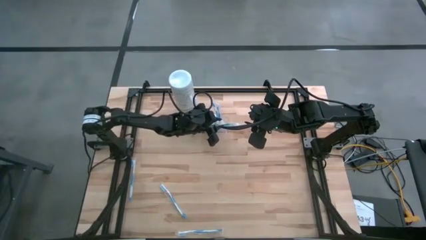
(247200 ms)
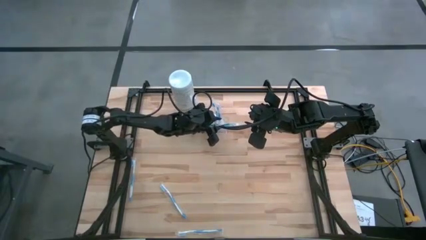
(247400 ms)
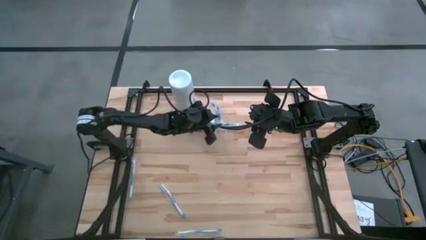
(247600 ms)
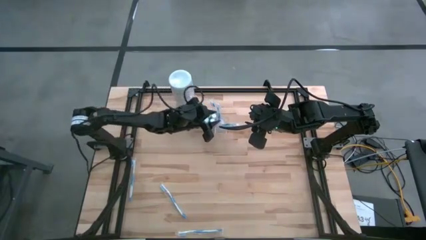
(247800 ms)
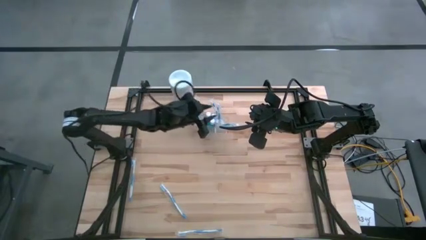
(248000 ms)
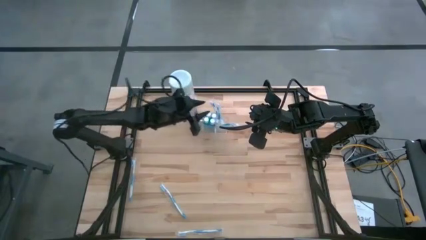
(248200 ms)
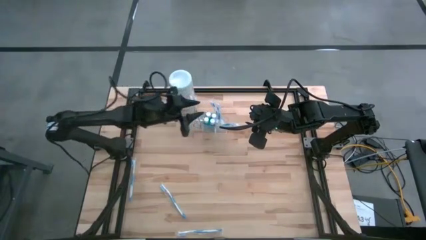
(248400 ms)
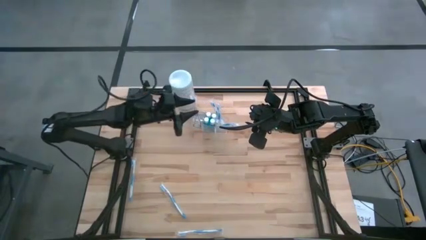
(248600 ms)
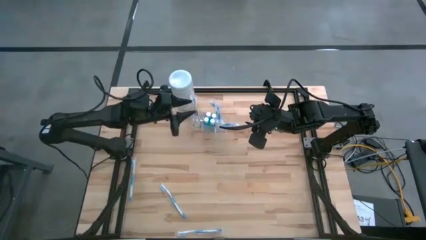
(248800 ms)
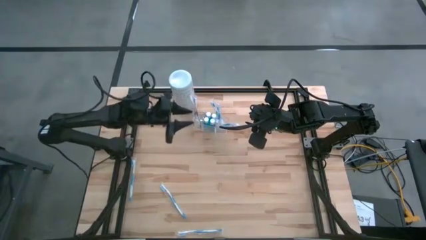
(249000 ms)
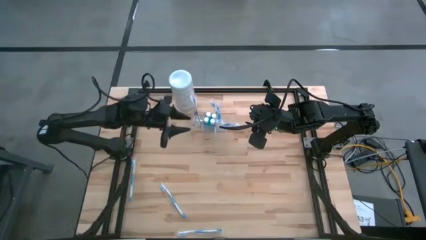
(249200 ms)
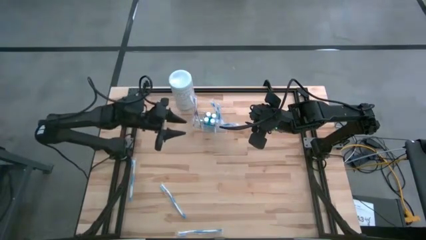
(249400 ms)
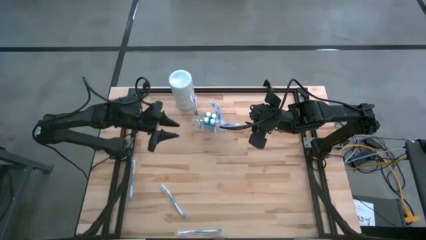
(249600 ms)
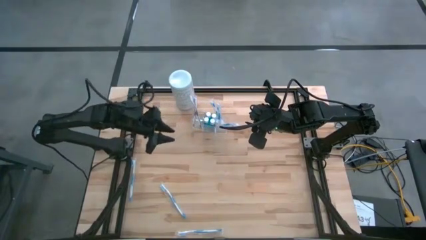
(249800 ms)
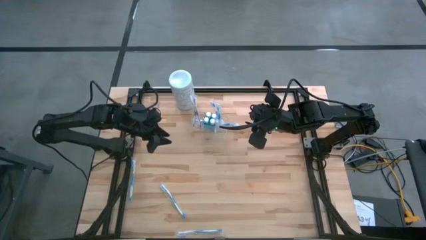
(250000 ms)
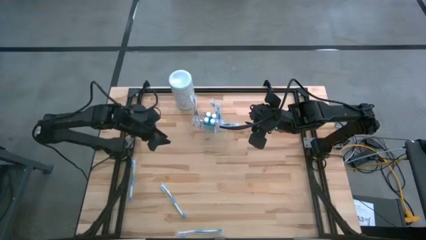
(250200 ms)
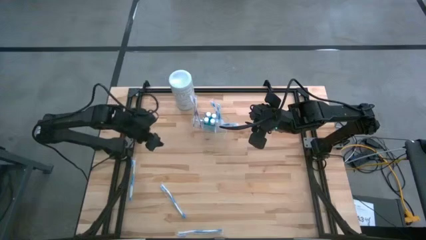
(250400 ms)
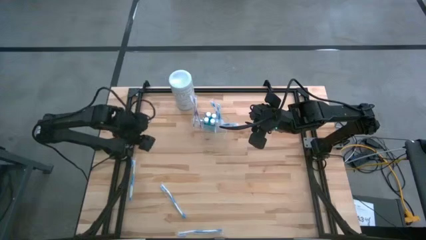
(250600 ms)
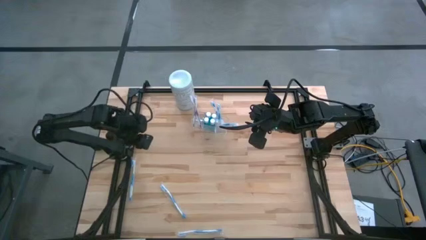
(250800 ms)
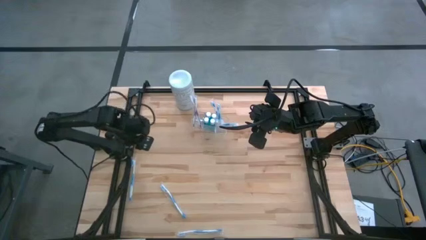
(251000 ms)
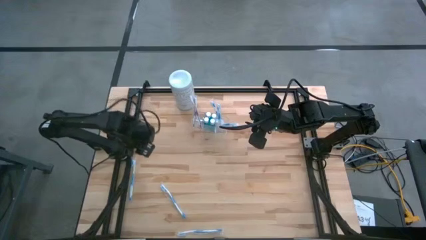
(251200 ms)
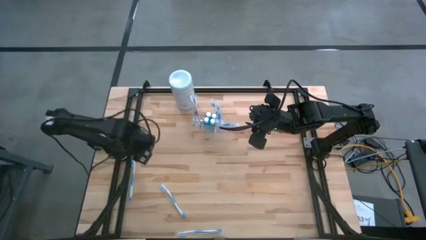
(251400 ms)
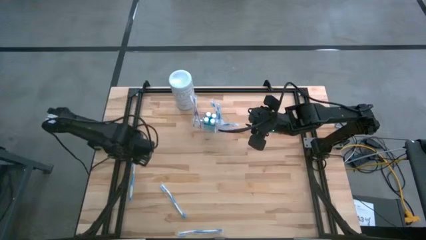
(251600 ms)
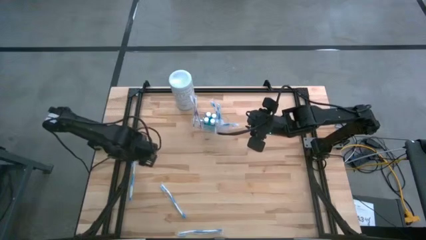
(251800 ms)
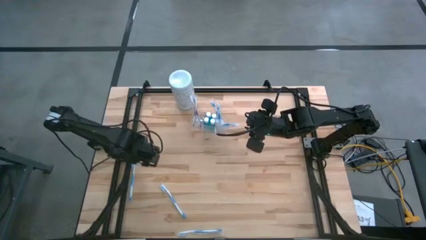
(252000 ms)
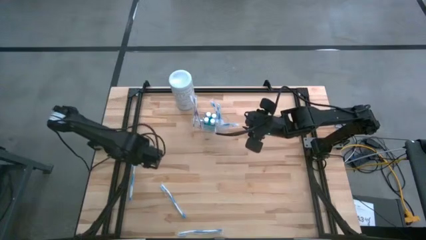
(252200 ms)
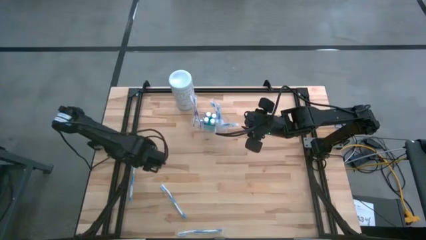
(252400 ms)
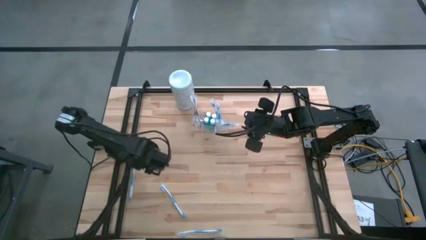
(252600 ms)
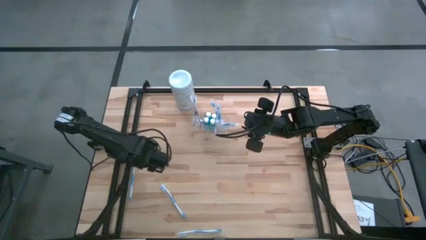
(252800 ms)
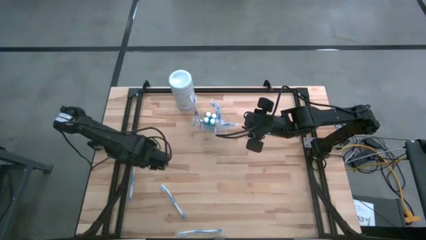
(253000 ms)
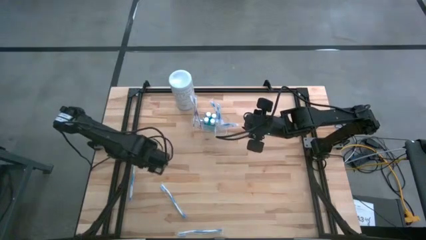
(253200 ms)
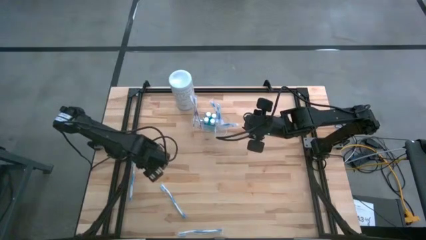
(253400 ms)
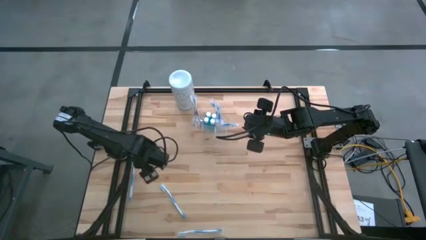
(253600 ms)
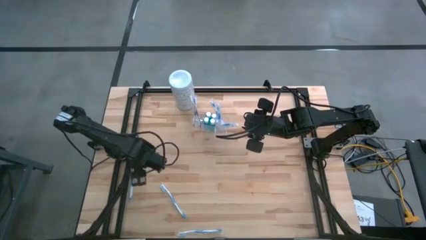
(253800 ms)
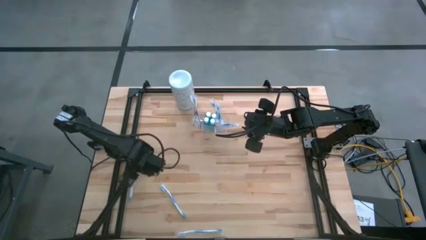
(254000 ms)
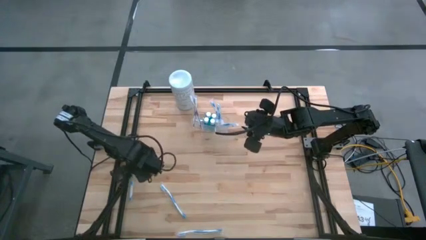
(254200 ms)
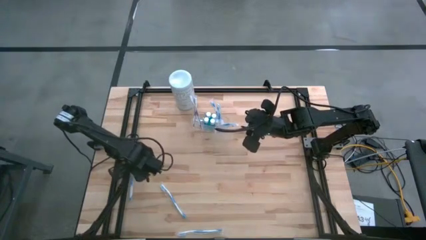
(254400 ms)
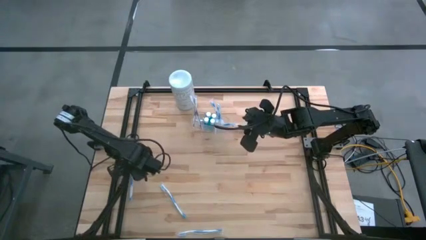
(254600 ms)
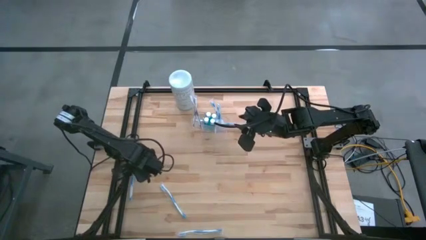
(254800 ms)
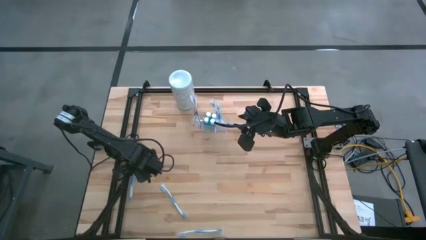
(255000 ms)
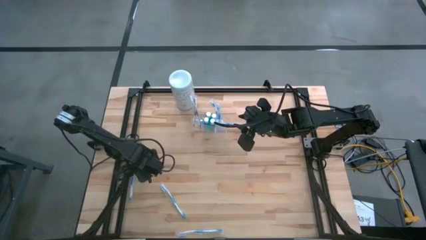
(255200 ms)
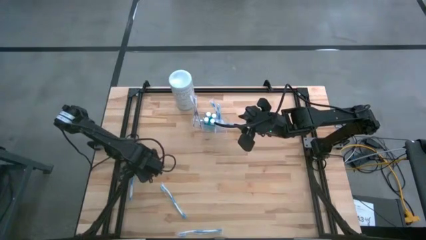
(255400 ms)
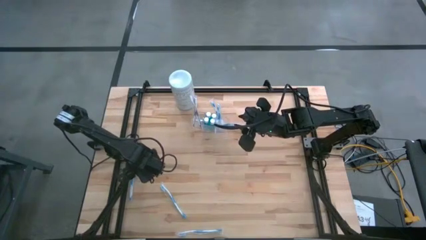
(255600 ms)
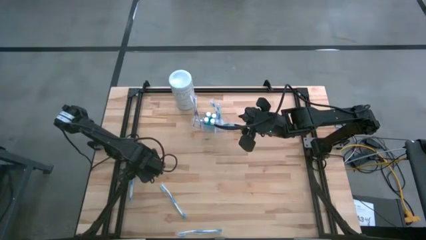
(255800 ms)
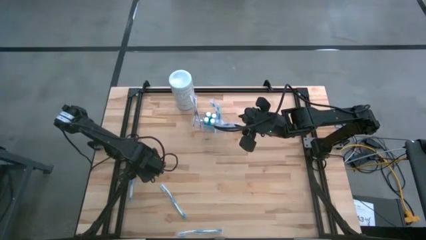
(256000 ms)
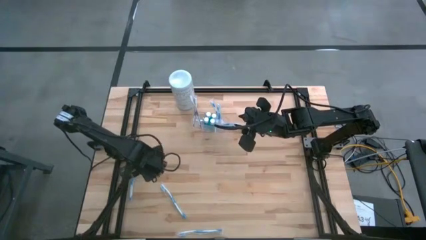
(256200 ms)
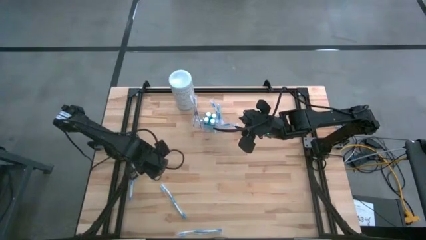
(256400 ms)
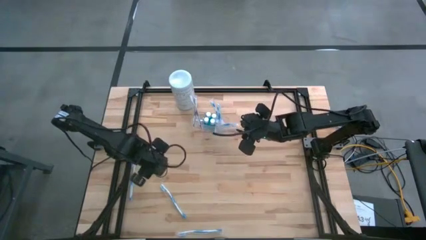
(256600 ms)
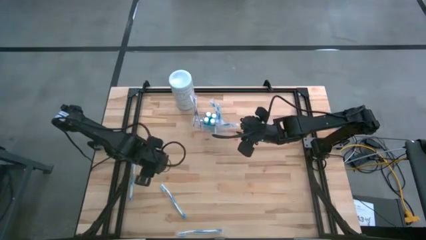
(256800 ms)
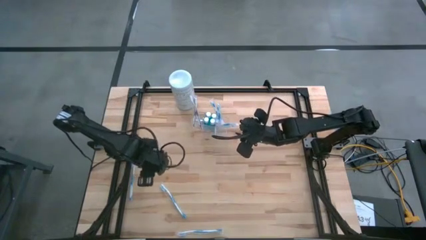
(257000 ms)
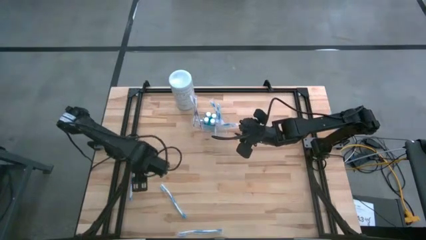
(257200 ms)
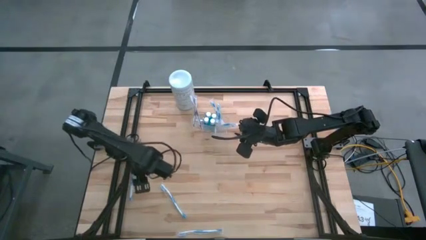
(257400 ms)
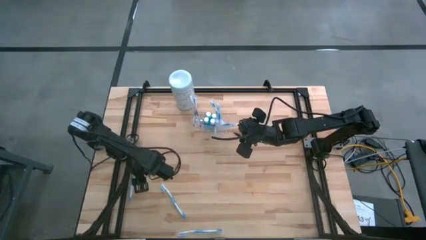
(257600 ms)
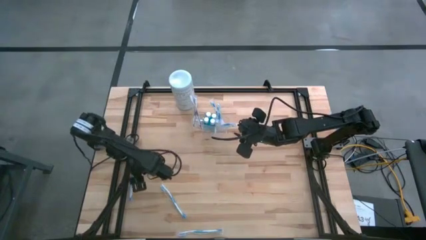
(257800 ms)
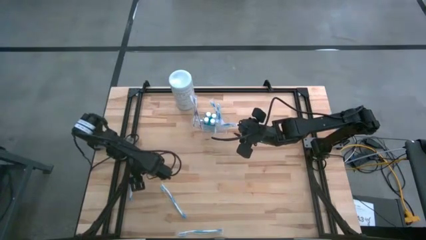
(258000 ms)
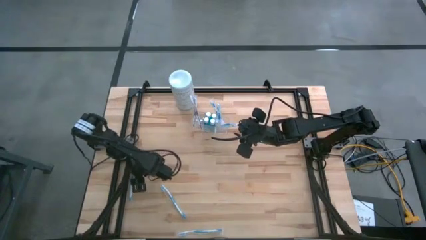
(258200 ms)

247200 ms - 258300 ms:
Task: Pick & Place toothbrushing station
Put the blue toothbrush into the right of the transparent organizer

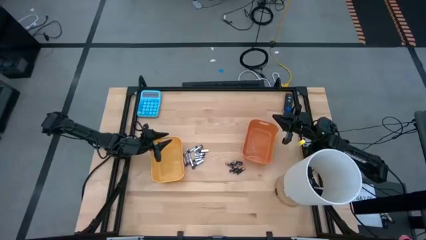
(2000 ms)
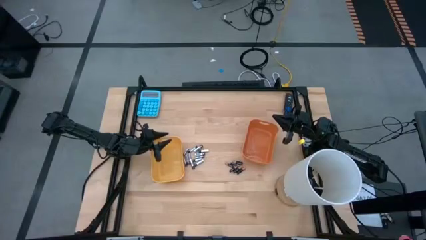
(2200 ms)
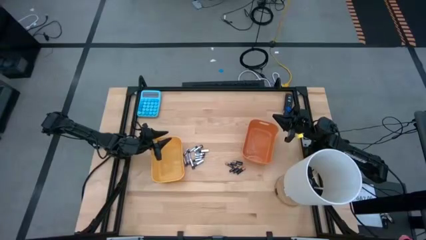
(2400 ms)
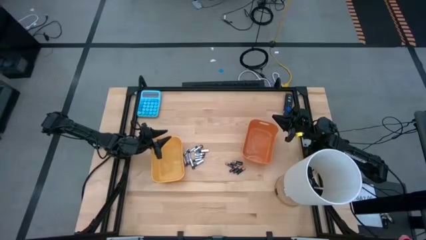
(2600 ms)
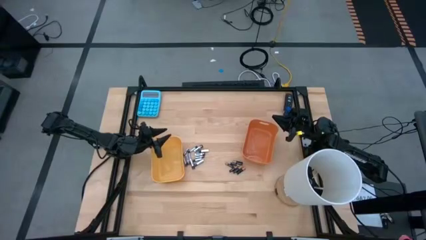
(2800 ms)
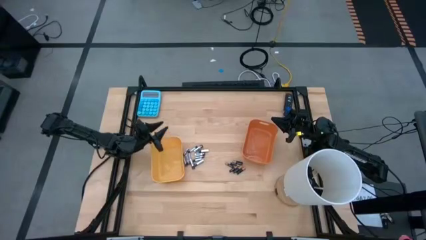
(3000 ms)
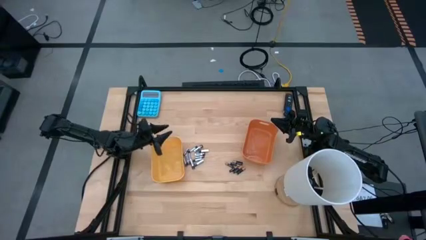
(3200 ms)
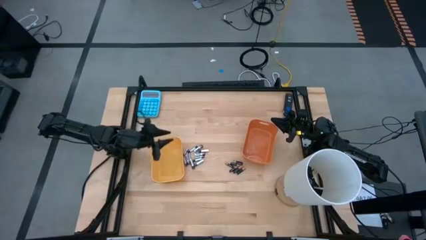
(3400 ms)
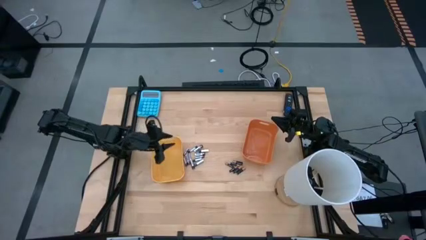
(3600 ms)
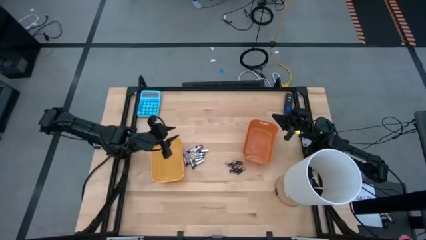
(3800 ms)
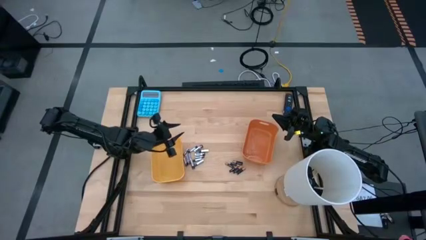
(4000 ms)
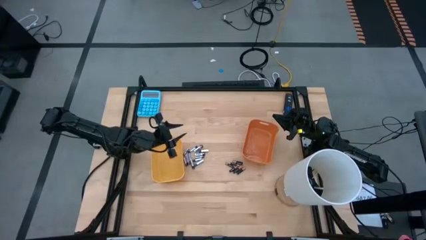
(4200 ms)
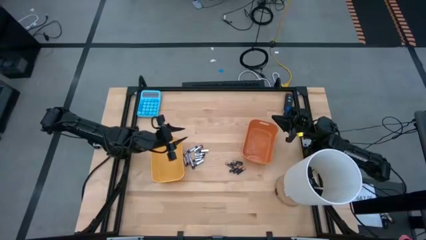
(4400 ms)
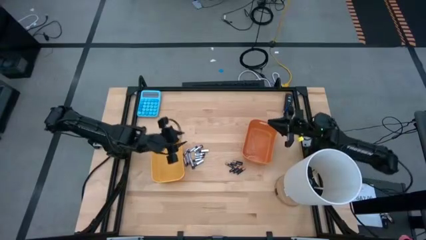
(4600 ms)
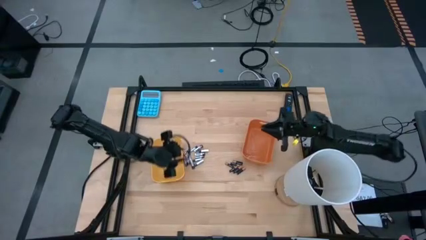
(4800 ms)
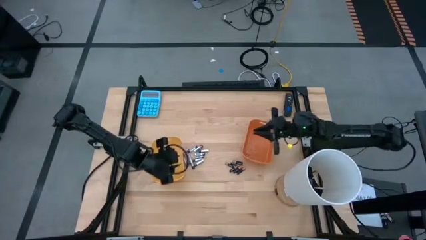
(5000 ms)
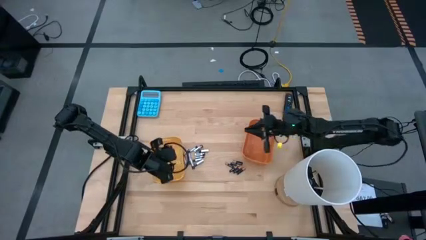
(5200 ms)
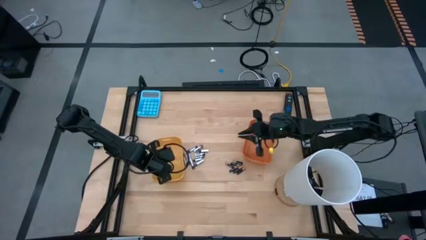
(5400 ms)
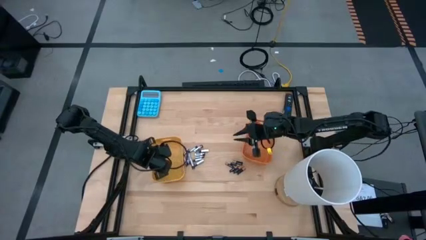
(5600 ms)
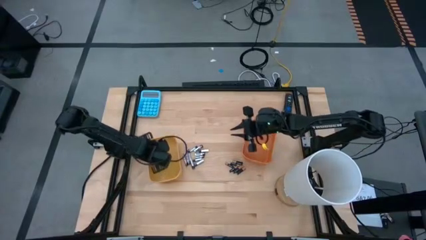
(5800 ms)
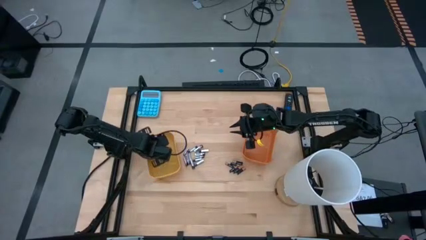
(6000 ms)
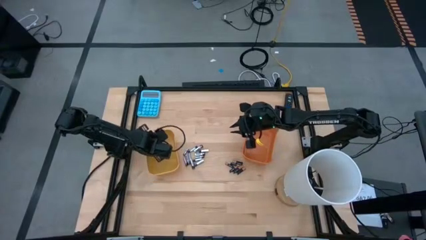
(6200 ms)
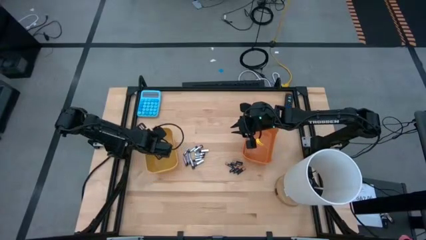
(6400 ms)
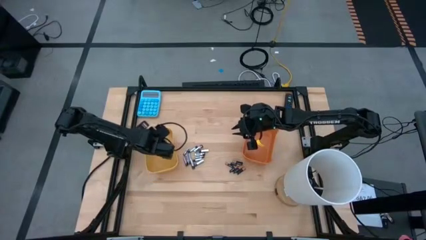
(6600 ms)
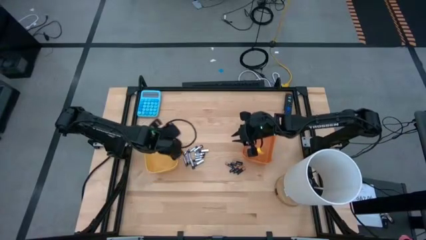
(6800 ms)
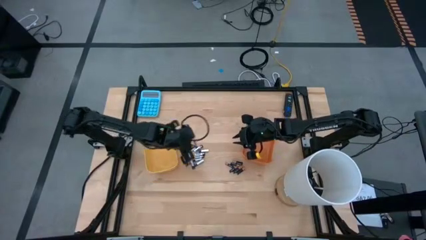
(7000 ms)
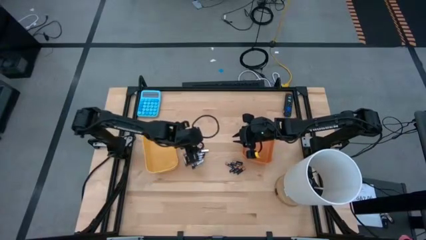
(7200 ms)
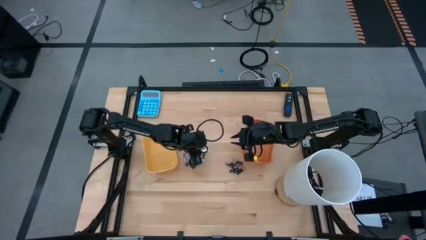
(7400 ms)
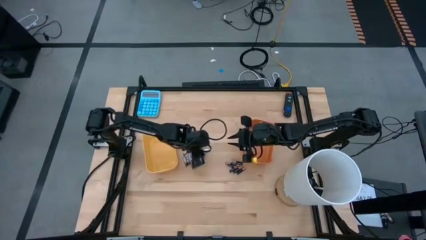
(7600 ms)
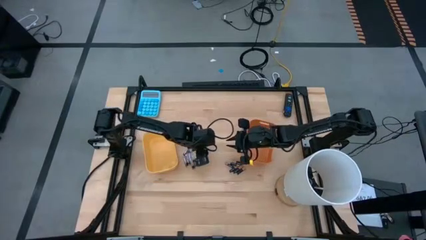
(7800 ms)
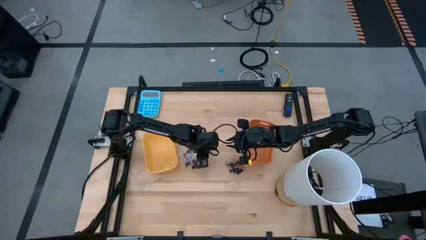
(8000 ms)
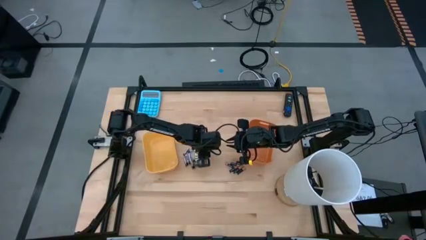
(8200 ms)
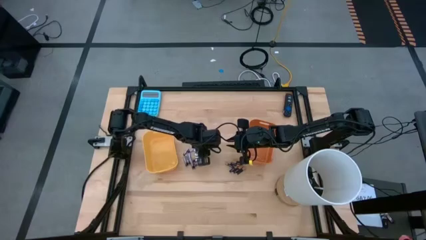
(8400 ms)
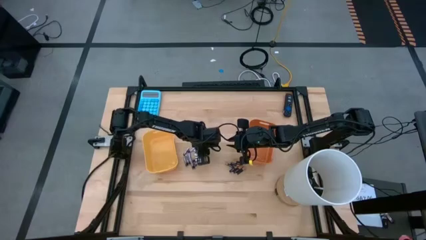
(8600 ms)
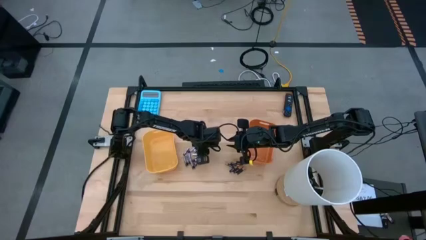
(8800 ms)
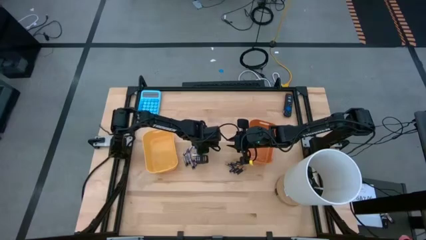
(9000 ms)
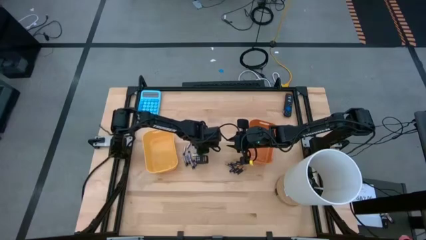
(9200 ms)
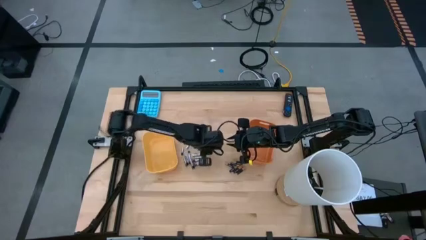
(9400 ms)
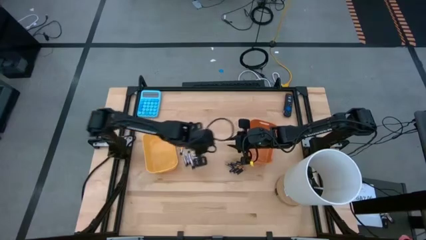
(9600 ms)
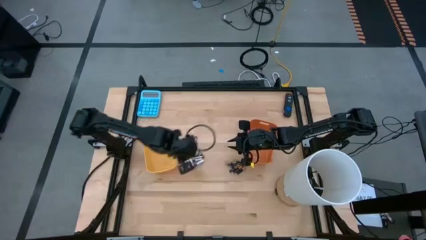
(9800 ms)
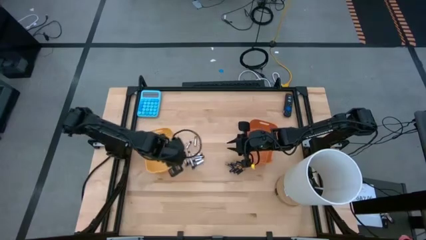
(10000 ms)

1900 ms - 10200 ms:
Task: Sort batteries
Put the silver battery into the yellow bin
